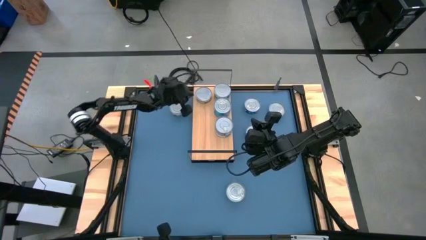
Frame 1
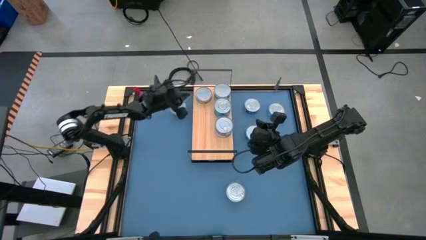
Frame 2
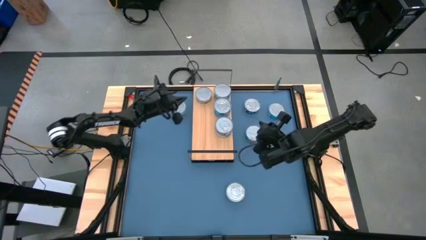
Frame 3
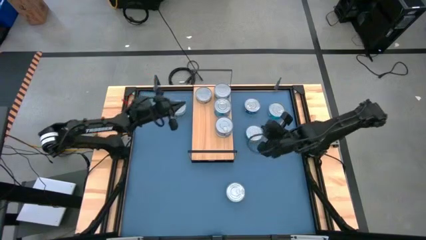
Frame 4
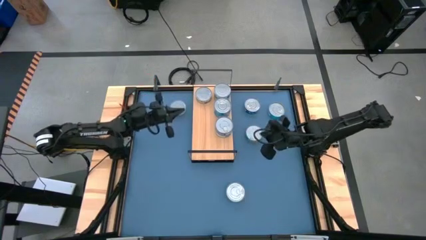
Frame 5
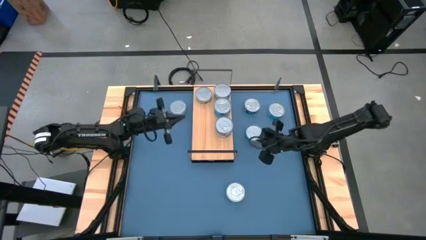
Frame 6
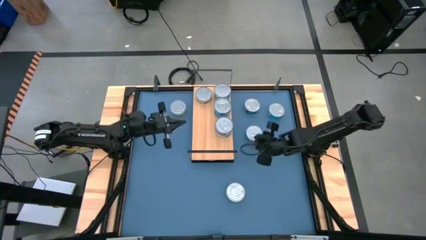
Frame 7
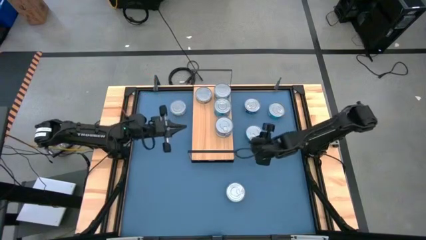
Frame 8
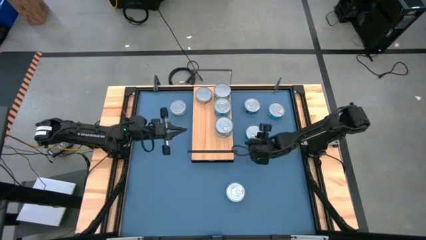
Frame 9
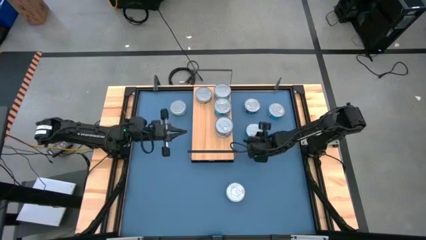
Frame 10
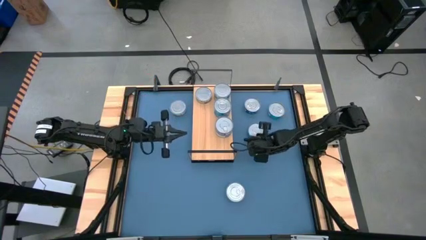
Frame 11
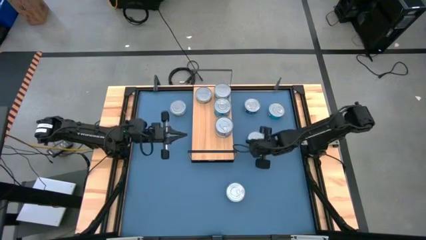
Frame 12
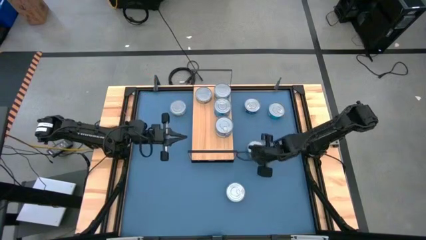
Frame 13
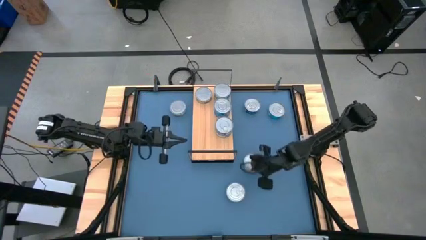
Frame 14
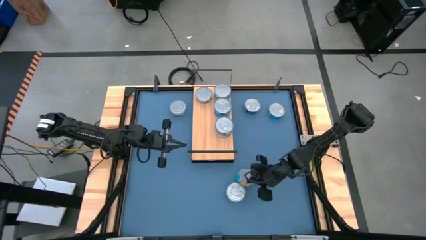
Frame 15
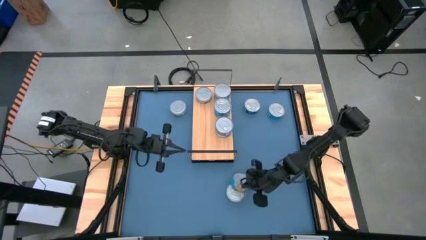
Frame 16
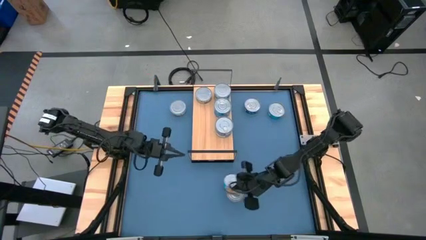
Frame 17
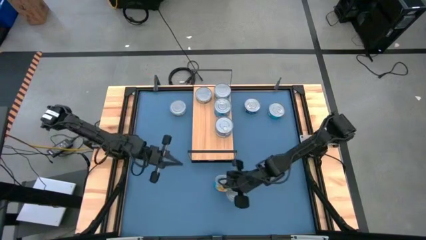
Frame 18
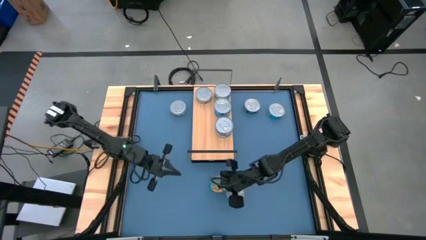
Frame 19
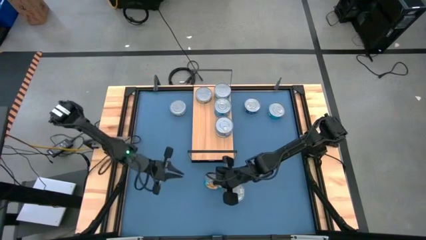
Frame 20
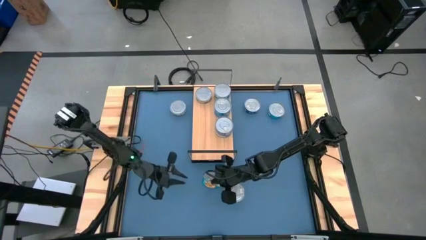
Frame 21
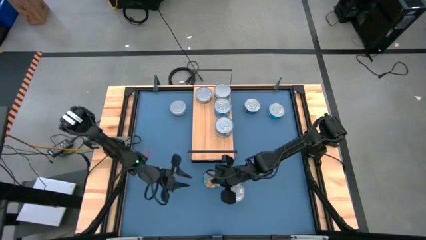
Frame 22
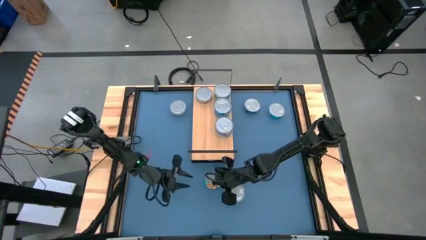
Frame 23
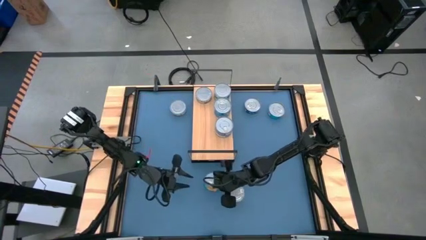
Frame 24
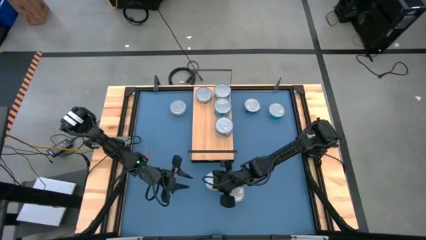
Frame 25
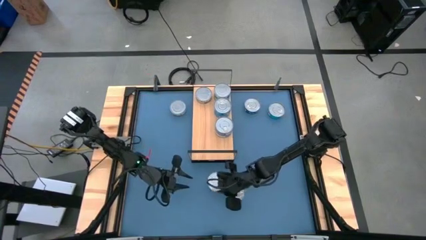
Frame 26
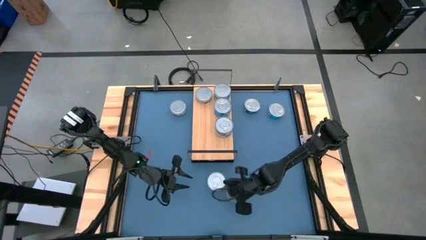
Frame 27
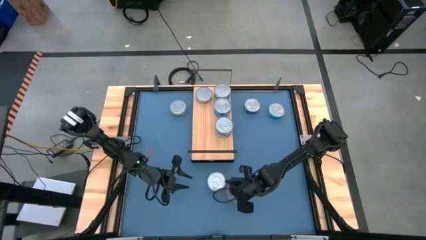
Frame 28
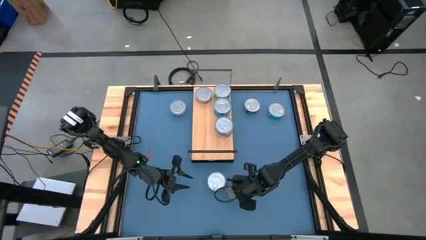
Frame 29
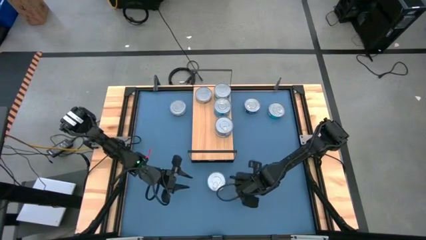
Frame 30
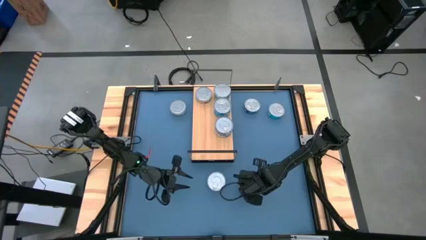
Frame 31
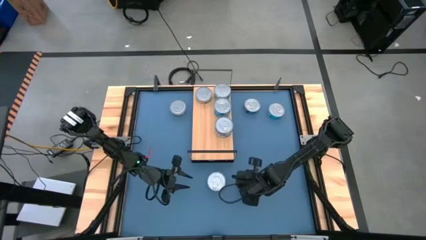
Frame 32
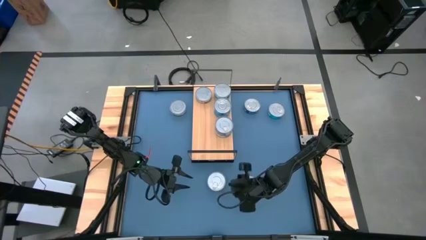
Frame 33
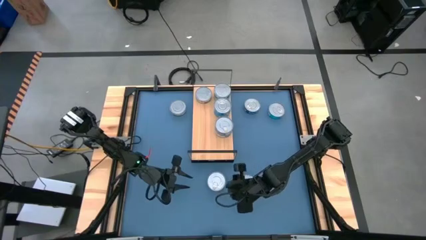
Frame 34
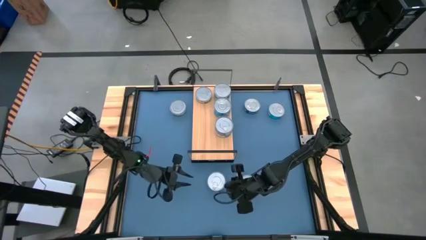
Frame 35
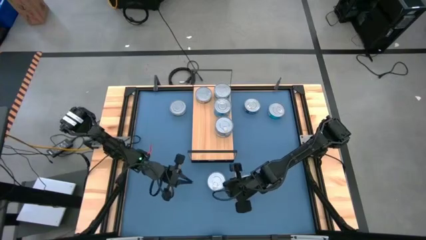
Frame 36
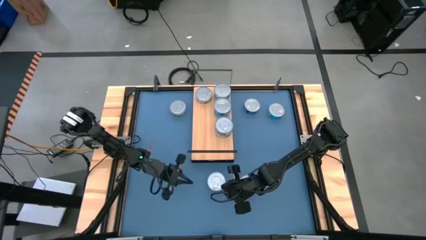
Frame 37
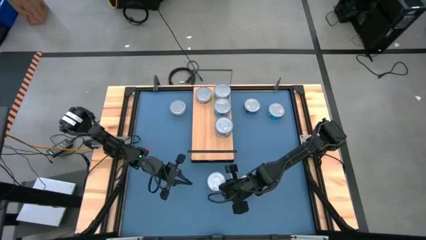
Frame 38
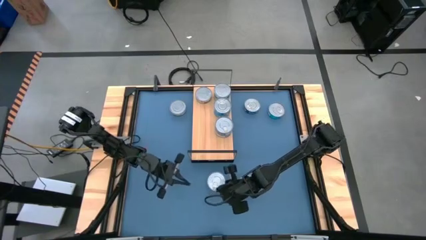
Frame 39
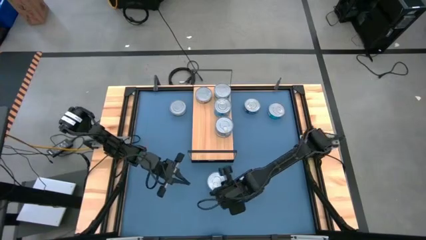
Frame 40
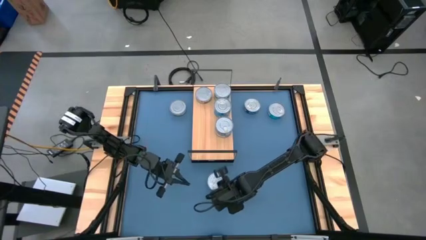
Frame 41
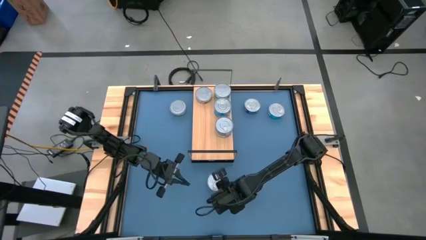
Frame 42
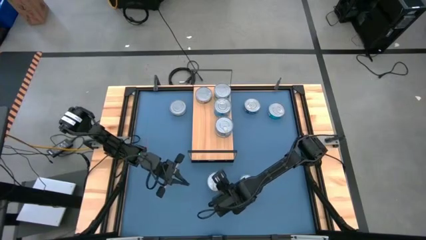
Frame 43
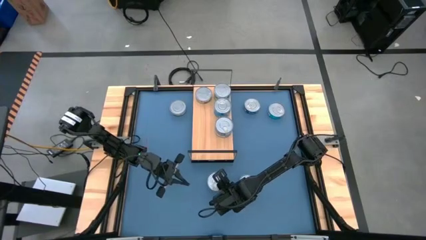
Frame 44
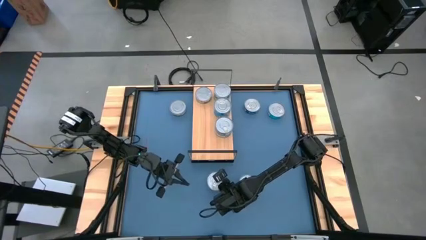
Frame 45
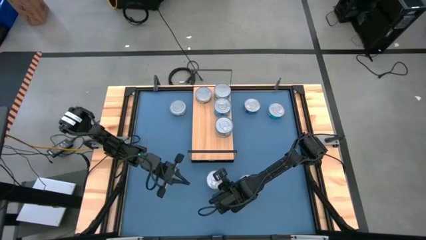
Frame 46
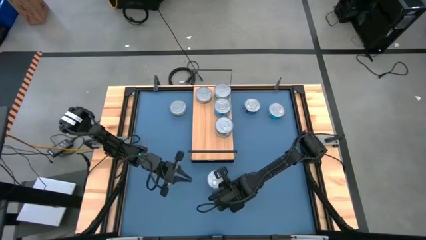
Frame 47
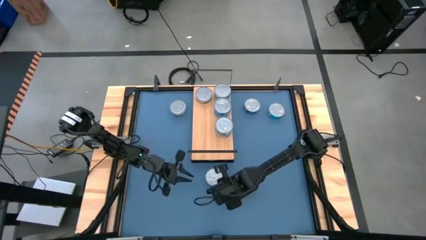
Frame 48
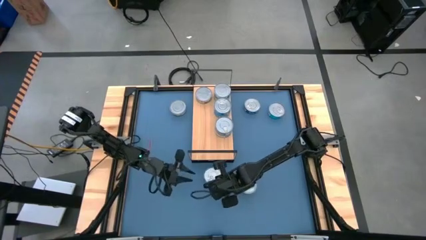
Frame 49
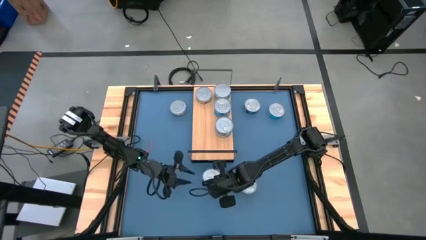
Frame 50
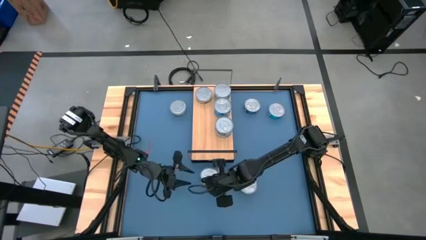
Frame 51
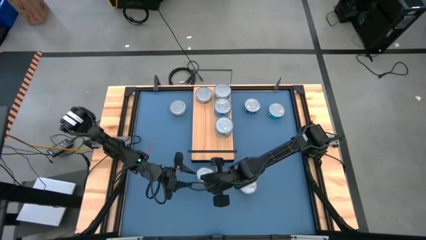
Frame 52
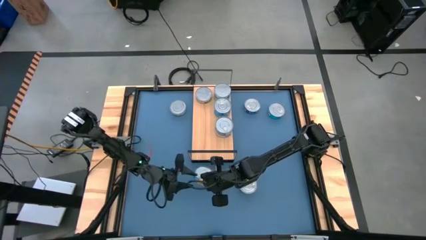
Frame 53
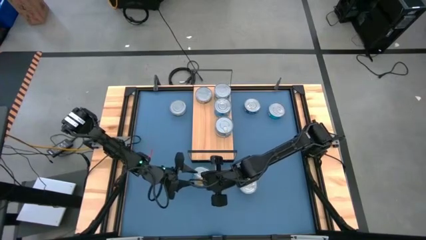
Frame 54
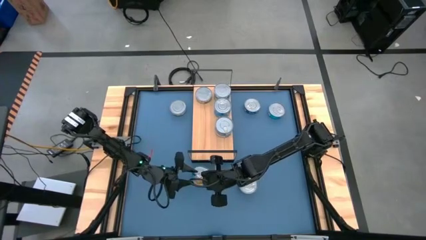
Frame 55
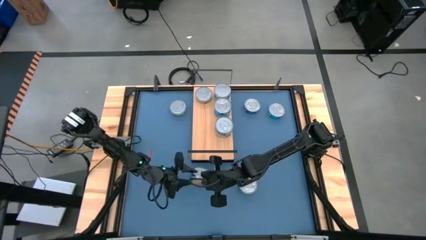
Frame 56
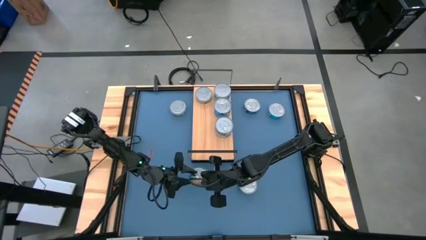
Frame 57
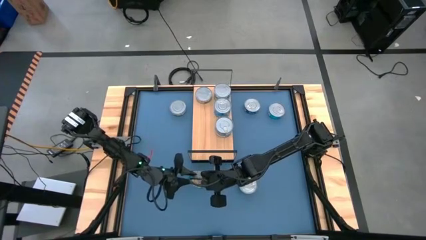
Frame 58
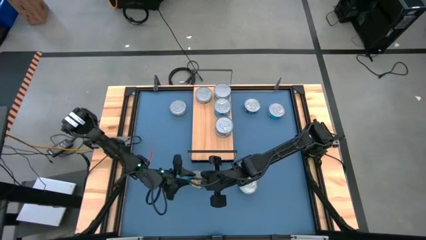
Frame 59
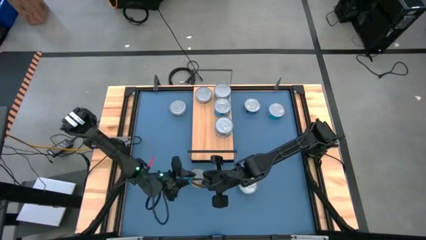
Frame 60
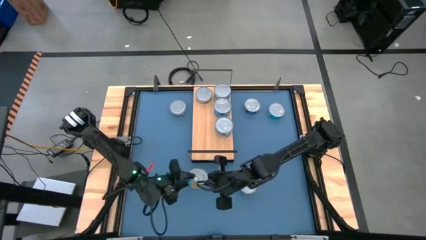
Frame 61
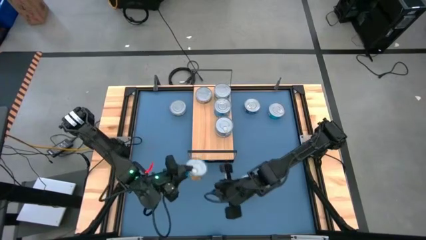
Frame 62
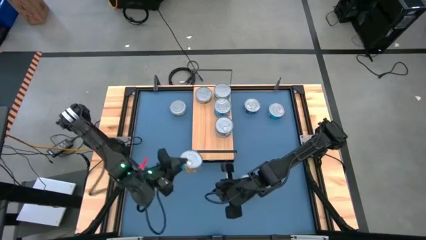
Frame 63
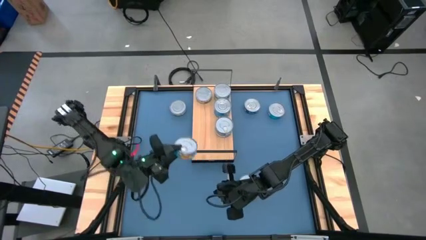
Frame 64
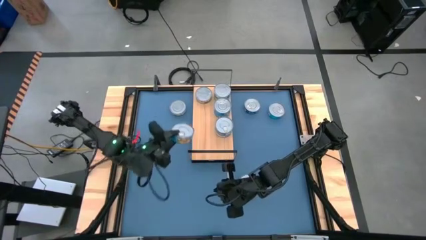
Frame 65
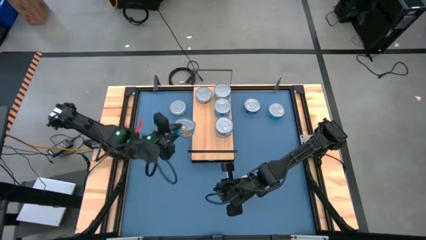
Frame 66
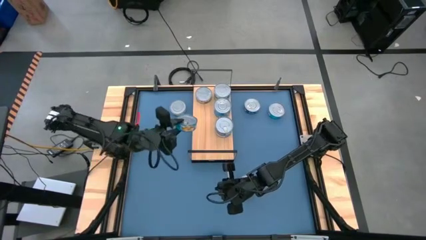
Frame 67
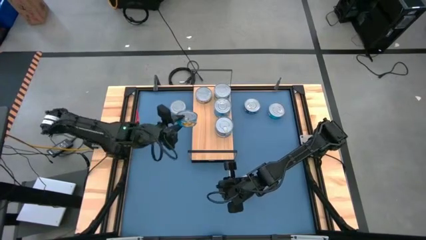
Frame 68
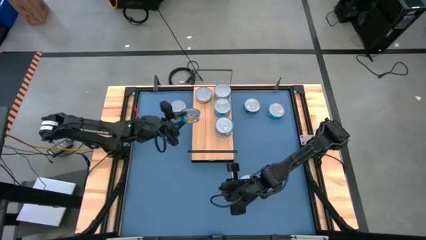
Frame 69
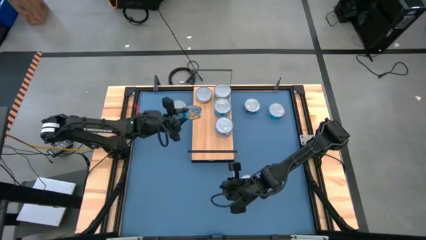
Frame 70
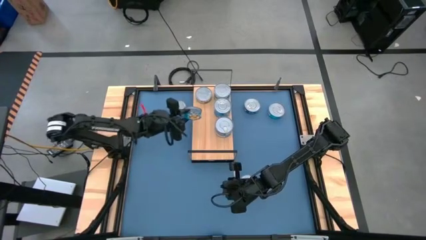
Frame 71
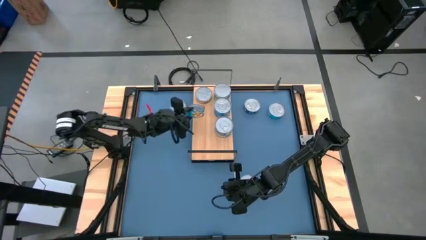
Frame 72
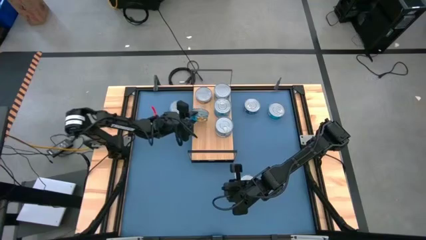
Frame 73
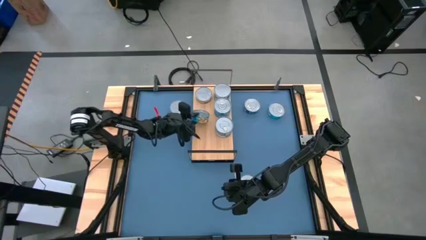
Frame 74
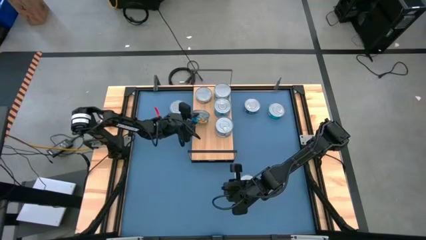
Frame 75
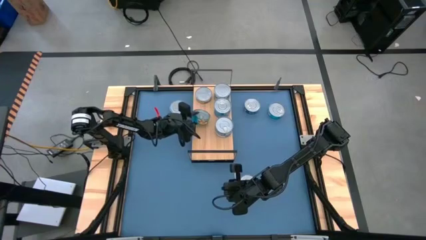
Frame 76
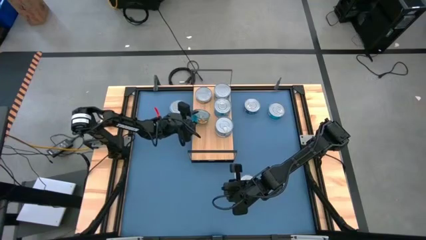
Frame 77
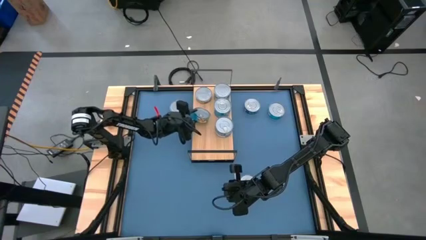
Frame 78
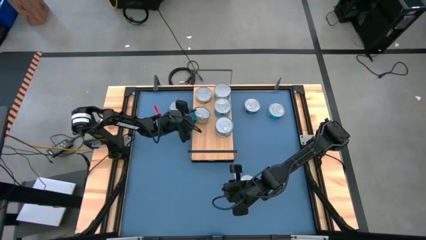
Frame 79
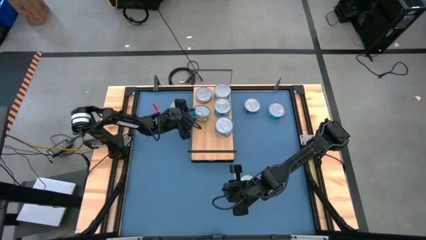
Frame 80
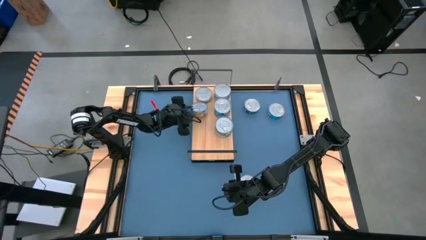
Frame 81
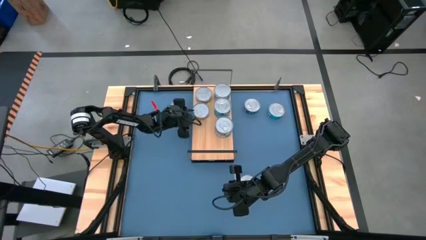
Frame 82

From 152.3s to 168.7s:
Task: Stack canned seafood by type on shelf
Put the yellow blue tuna can on the shelf aligned with the other yellow blue tuna can

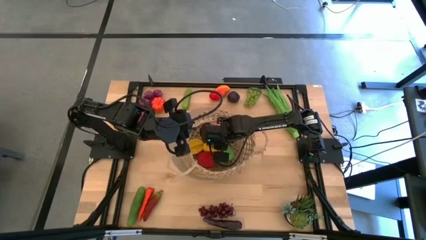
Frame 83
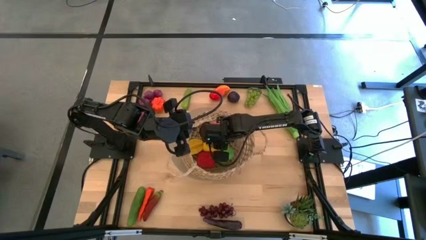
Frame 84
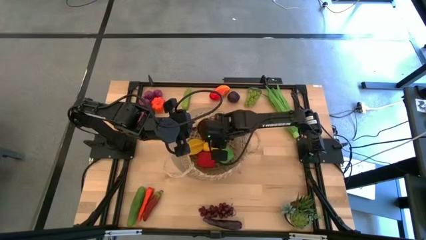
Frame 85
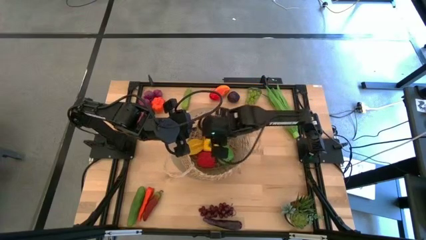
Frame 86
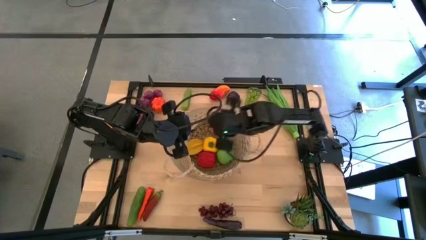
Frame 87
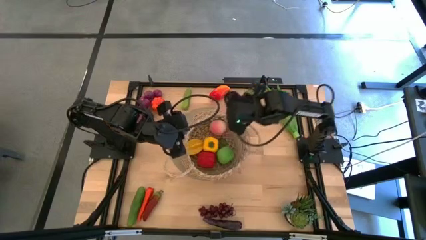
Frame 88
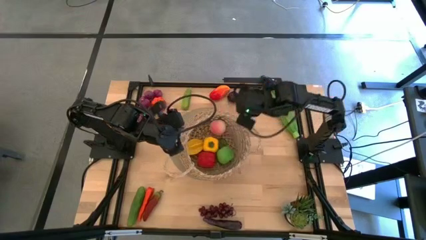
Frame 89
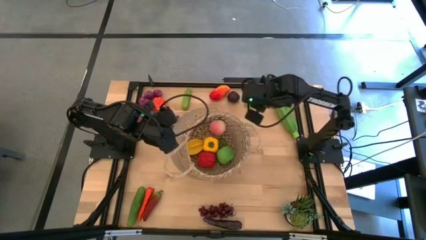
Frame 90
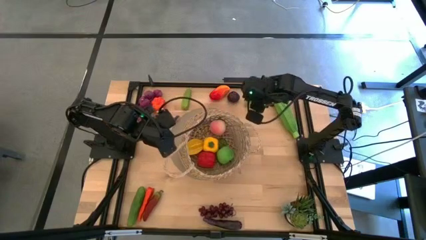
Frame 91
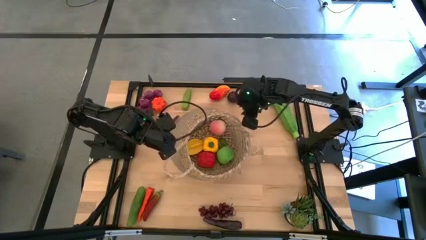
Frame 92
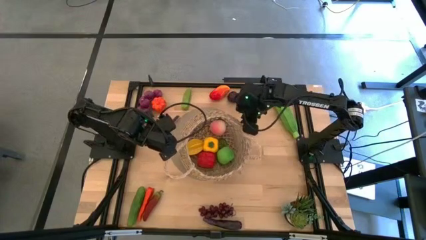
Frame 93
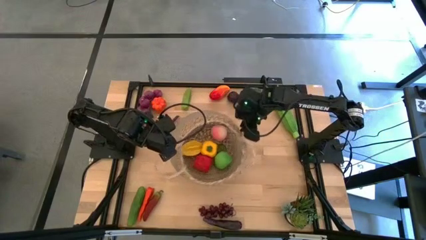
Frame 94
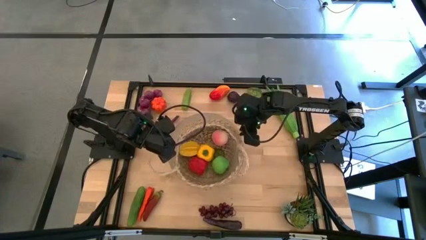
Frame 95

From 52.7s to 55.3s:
Task: Build produce basket
Adjust the brown basket
